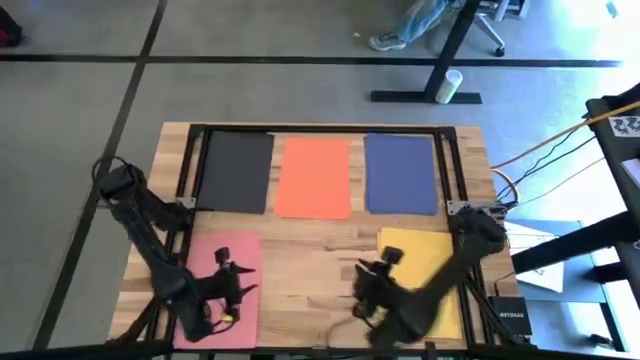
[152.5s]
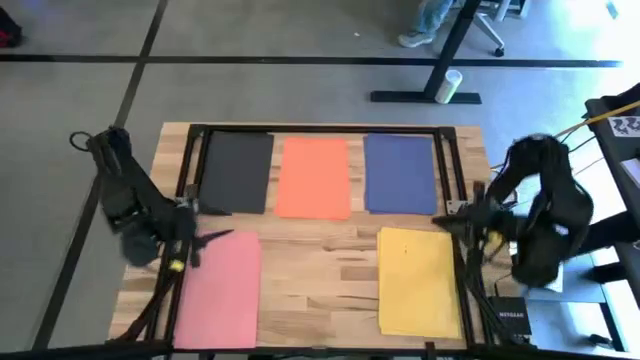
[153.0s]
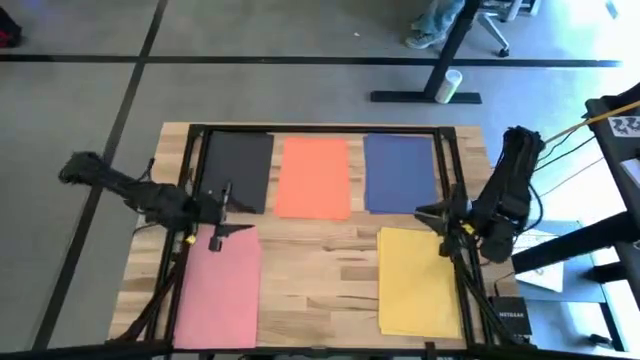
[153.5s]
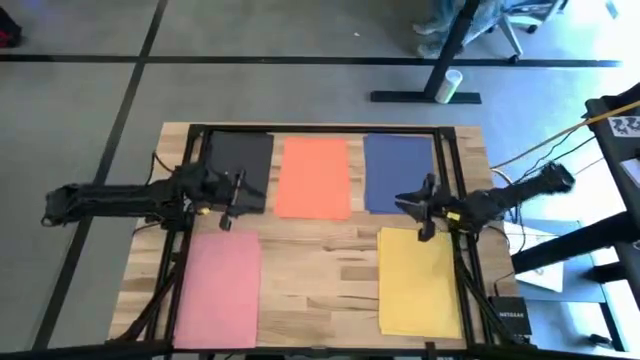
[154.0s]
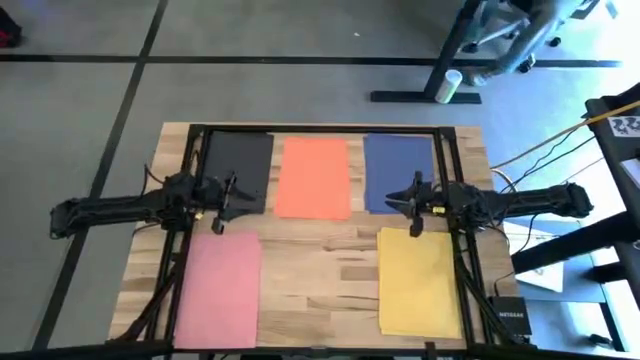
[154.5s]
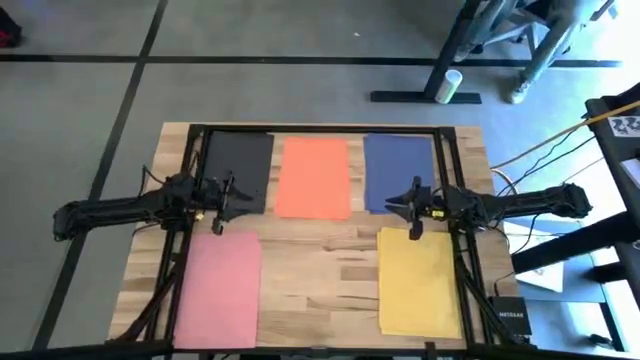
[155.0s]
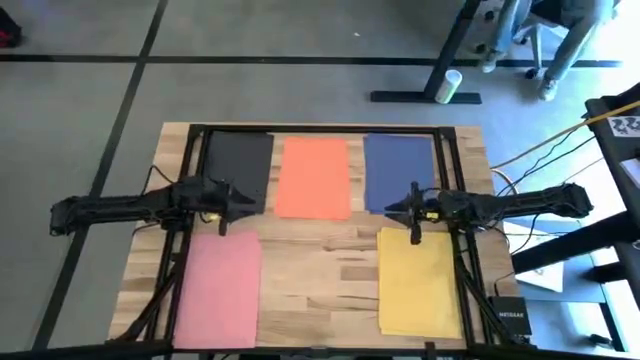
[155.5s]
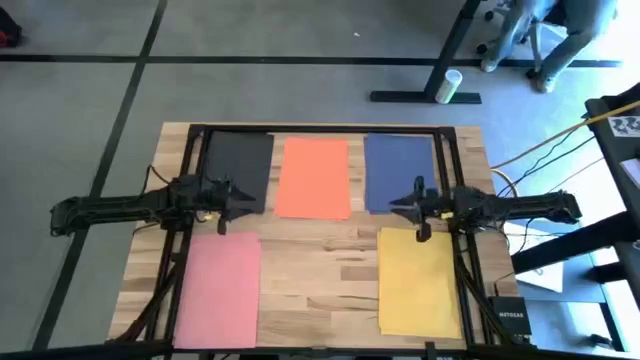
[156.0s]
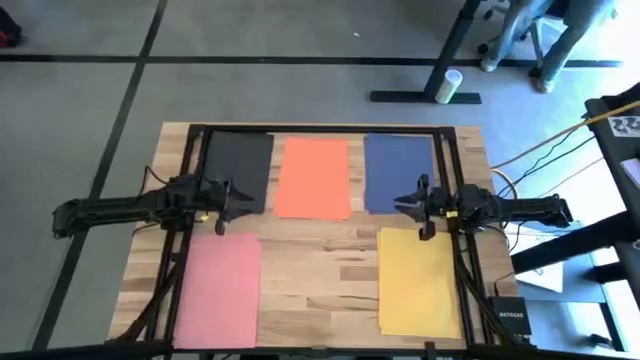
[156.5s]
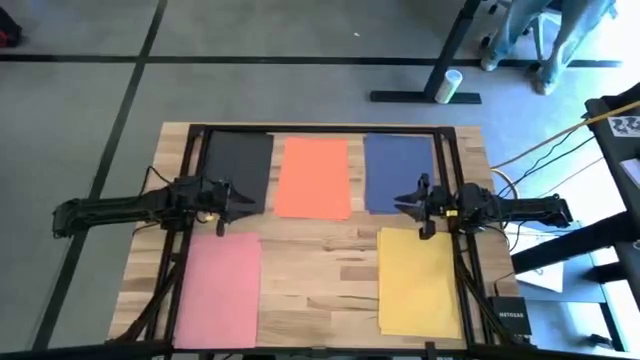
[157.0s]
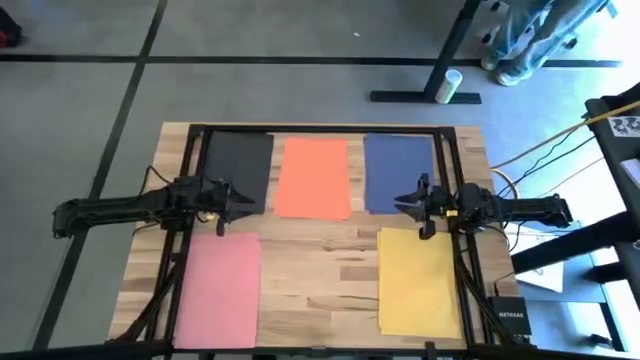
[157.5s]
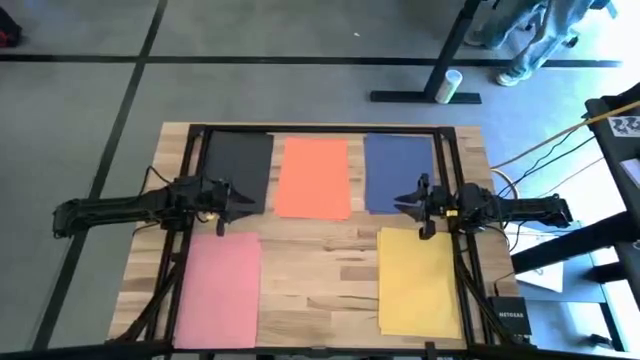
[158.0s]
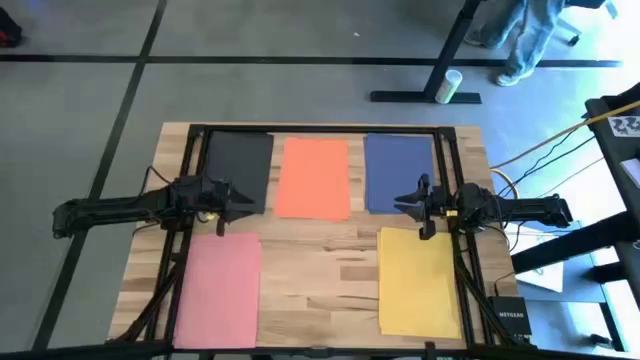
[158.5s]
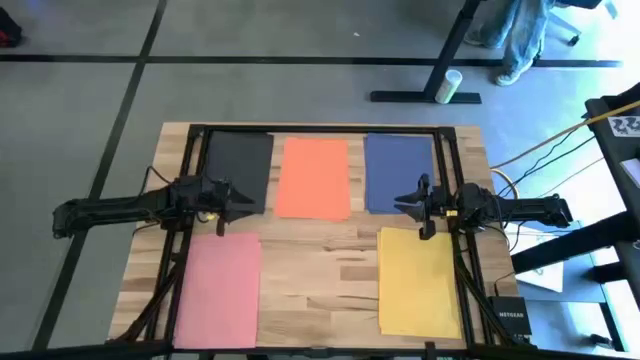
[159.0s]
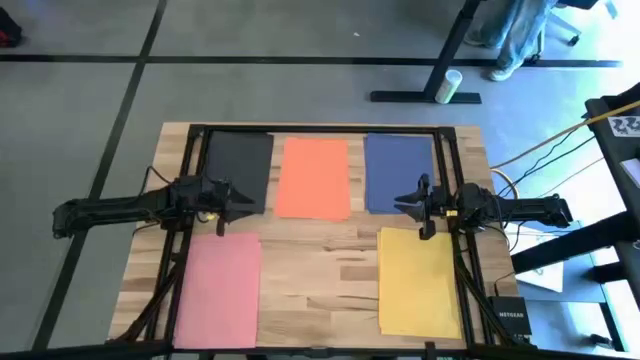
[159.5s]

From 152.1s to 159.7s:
Task: Organize paper
Return to Home Position

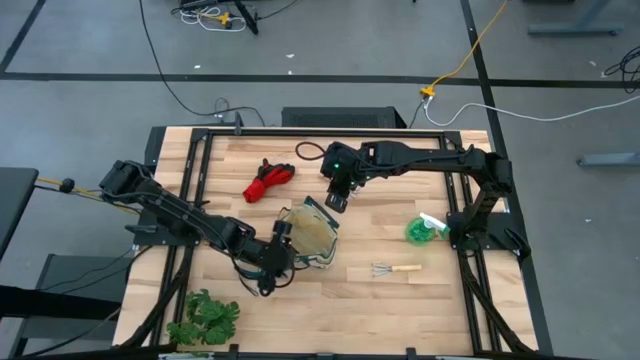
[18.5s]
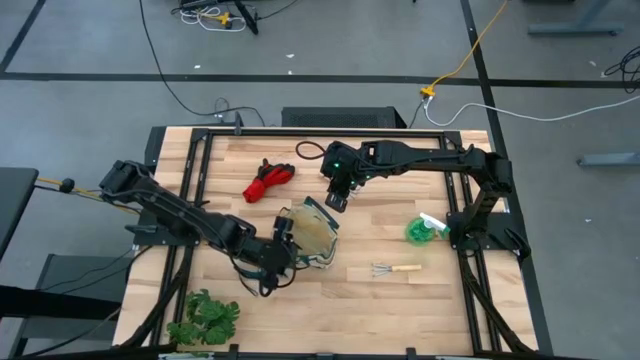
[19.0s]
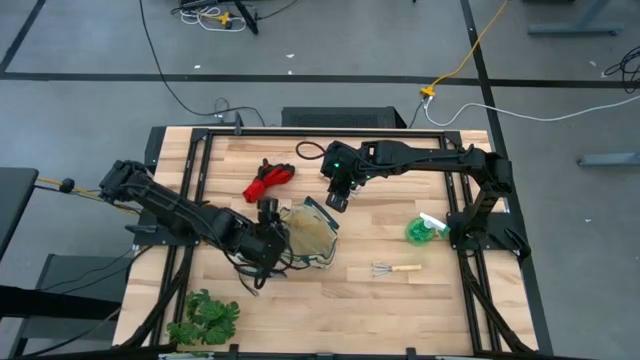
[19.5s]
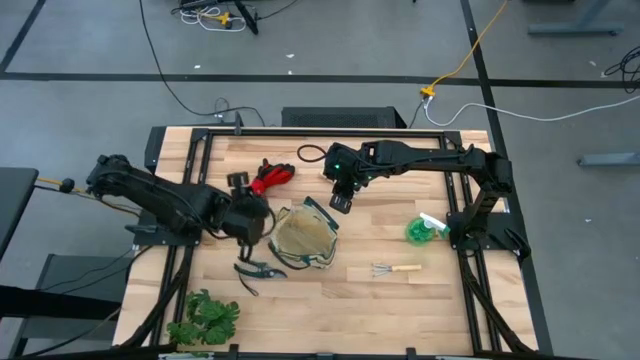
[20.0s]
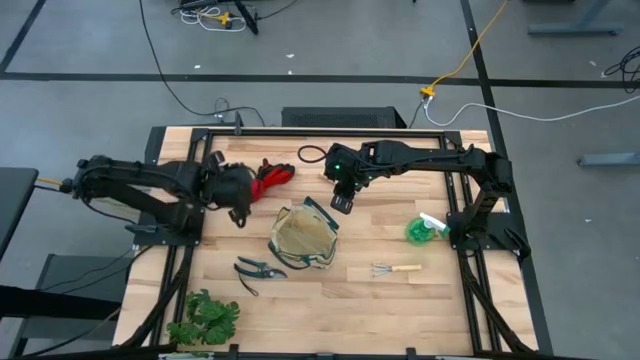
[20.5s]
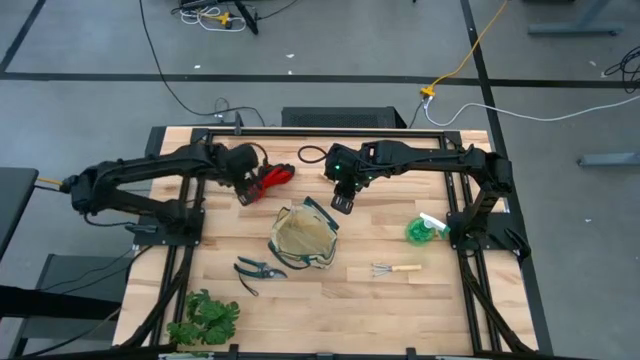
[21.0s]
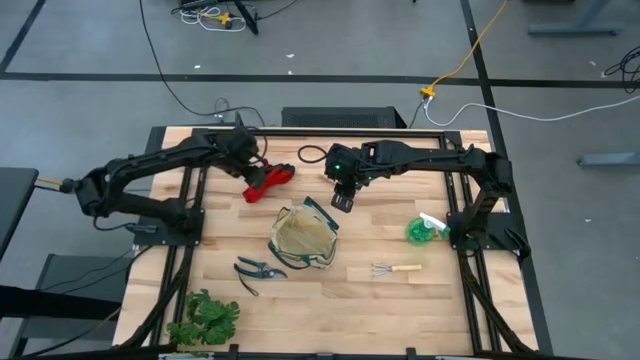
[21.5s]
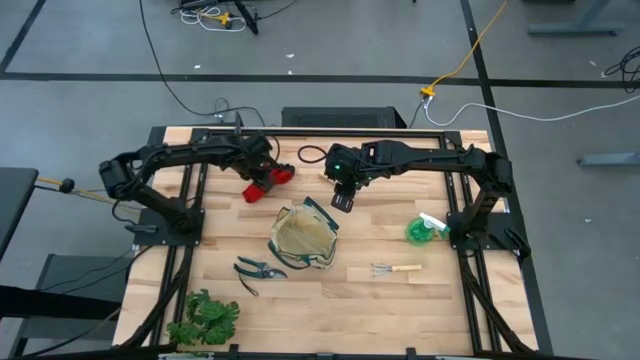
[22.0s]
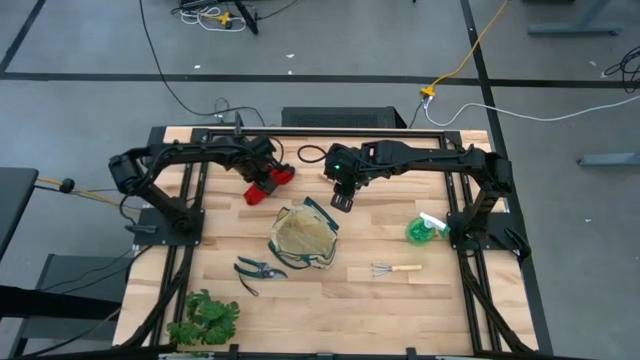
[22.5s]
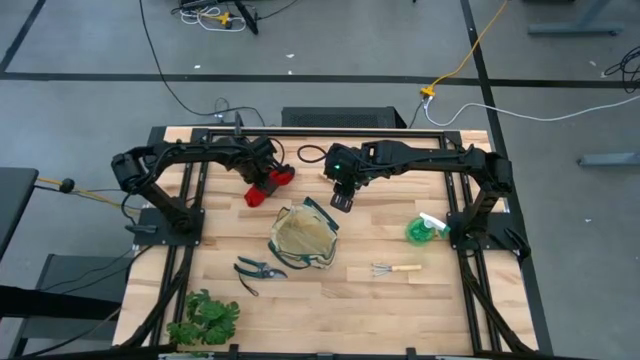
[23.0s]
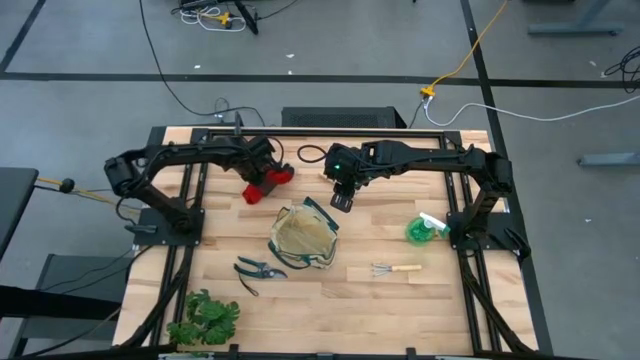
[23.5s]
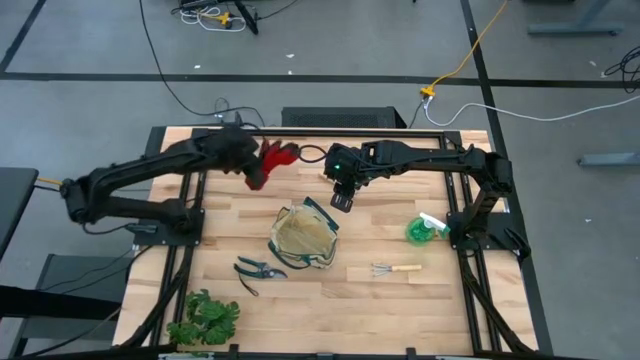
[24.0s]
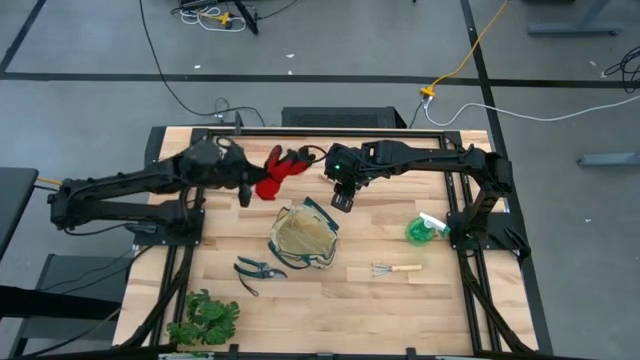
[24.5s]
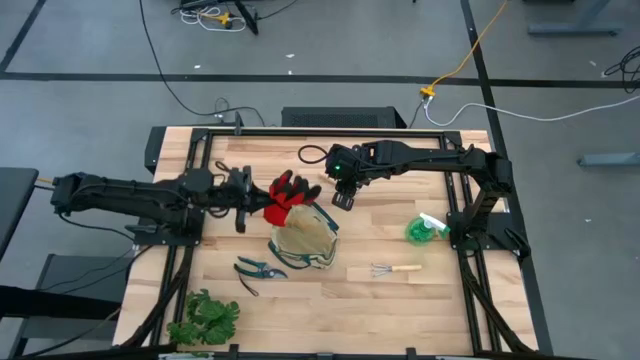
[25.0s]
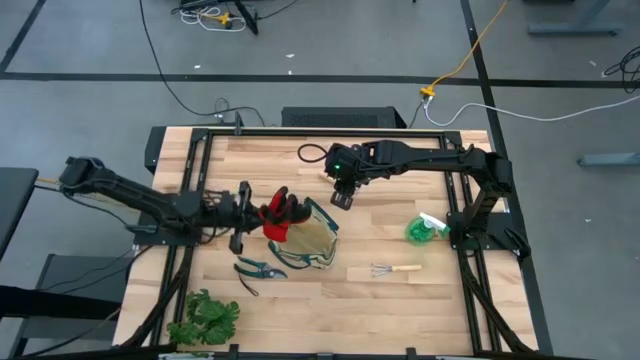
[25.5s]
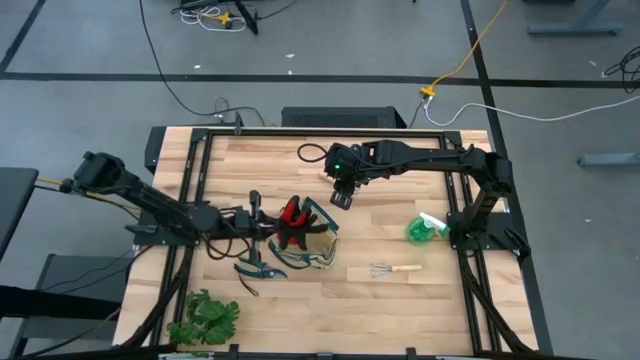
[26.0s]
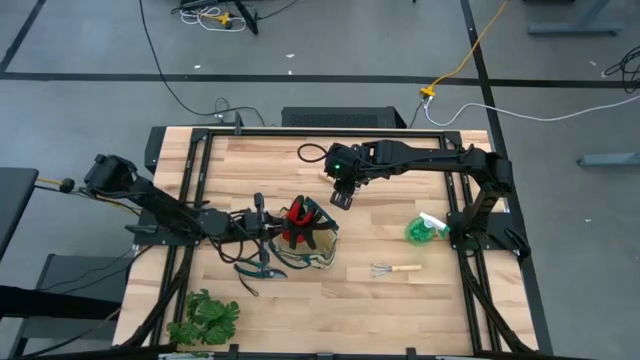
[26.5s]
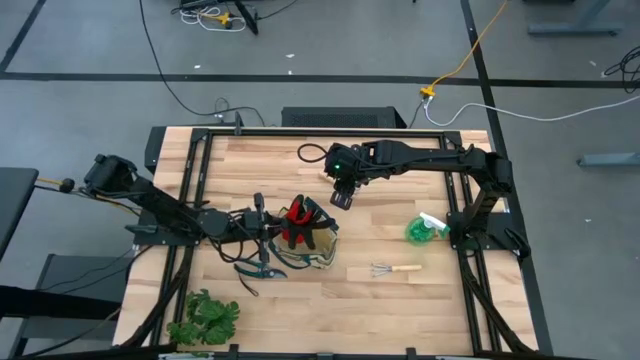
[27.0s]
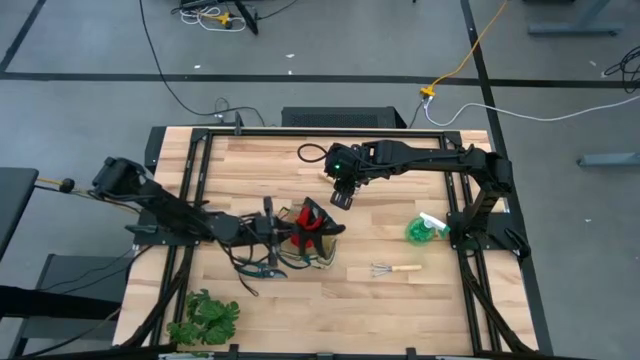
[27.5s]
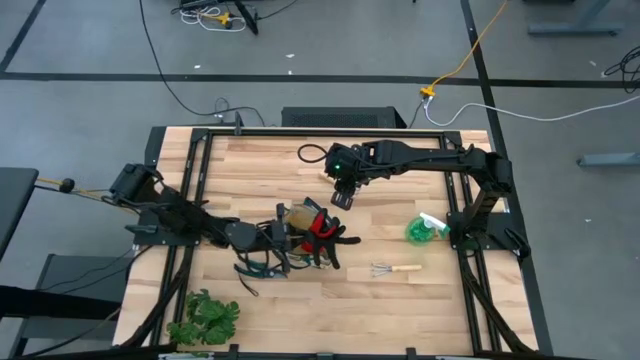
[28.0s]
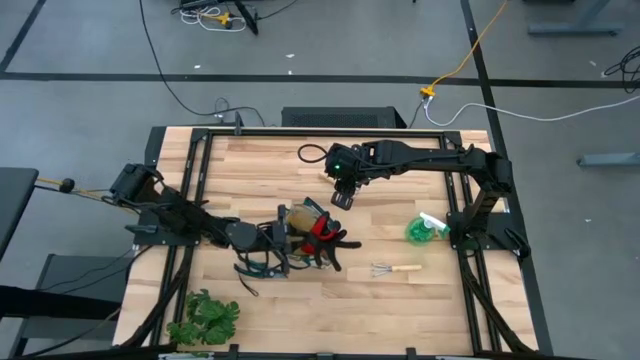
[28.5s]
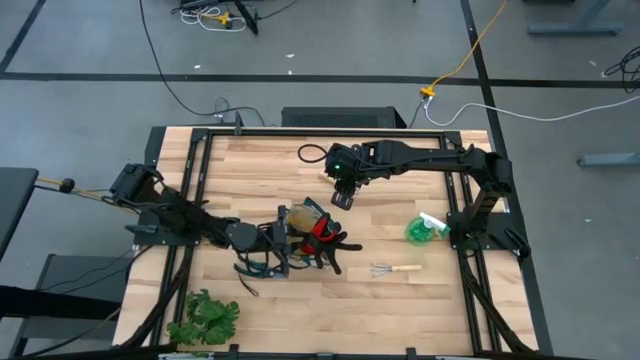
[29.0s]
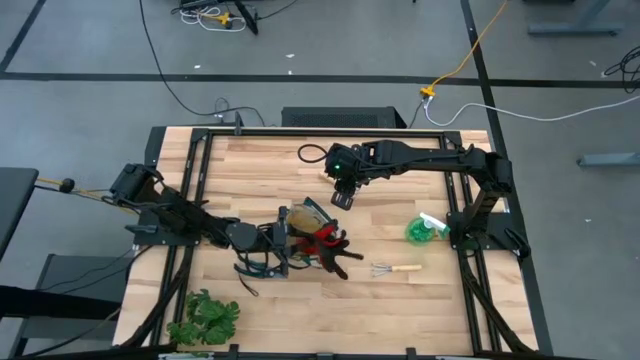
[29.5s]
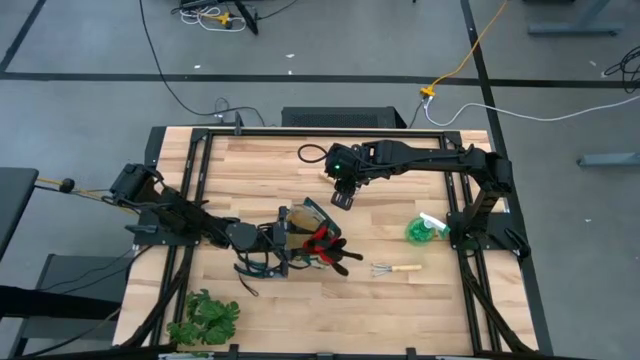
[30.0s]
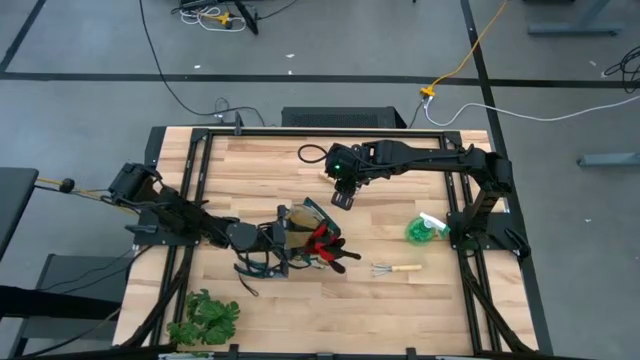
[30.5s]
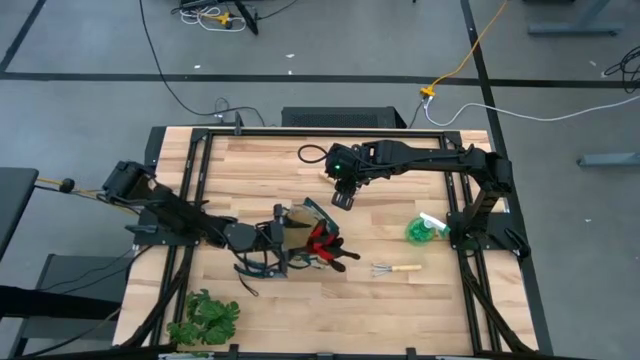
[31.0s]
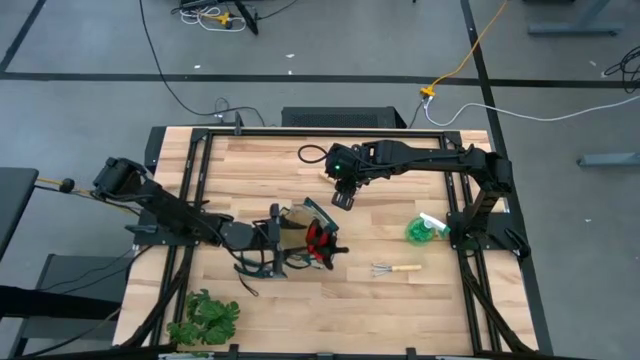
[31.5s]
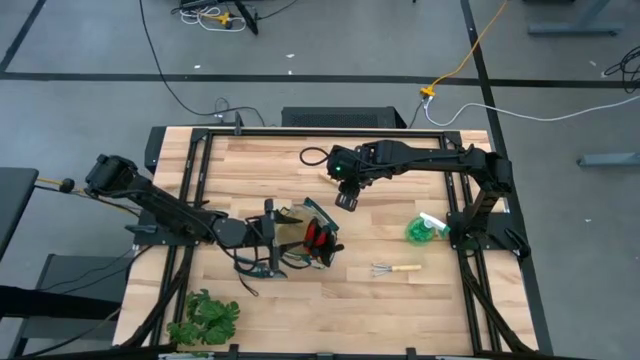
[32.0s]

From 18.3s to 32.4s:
Task: Pick & Place Garden tools in Gardening bag
Put the red gloves into the gardening bag
